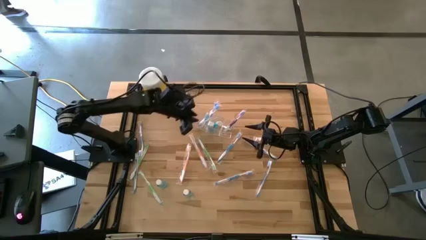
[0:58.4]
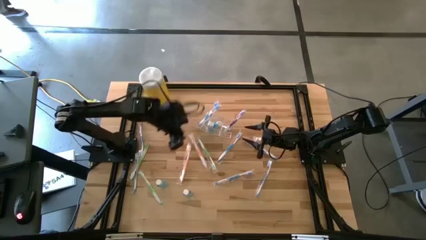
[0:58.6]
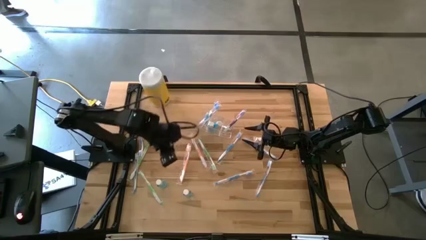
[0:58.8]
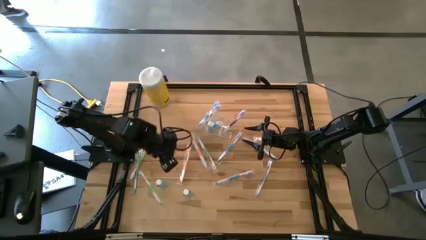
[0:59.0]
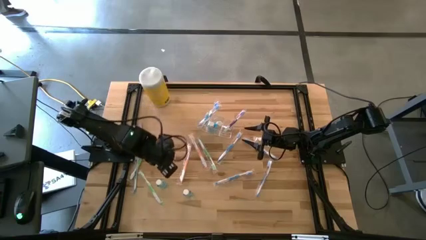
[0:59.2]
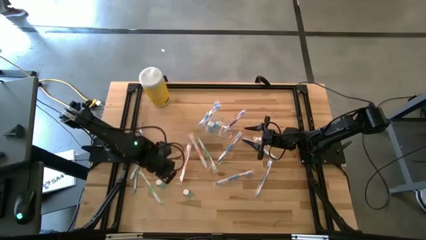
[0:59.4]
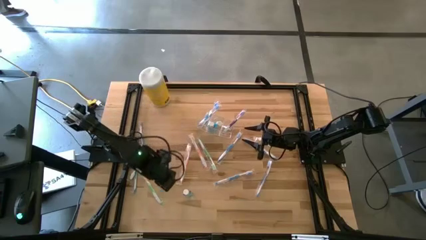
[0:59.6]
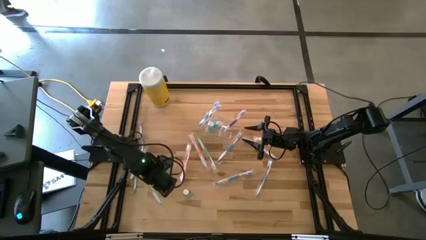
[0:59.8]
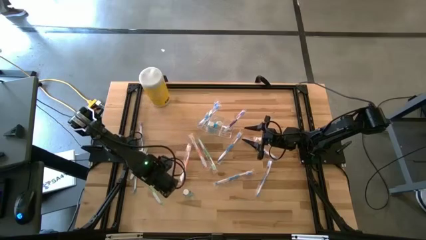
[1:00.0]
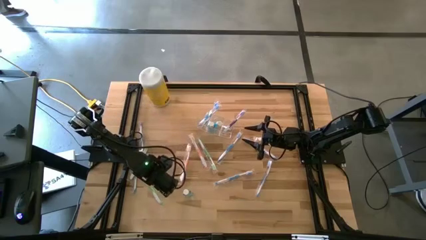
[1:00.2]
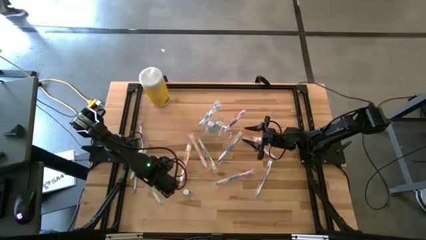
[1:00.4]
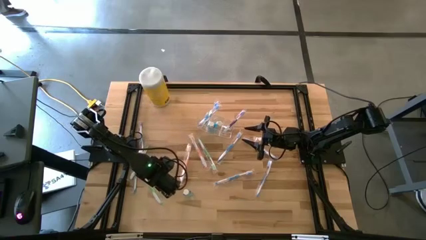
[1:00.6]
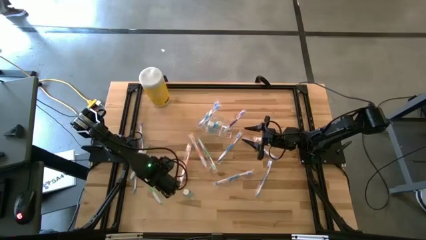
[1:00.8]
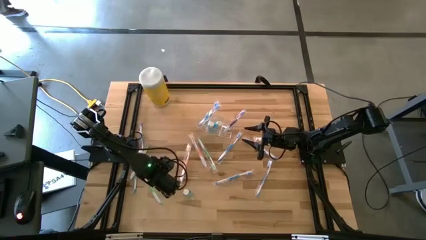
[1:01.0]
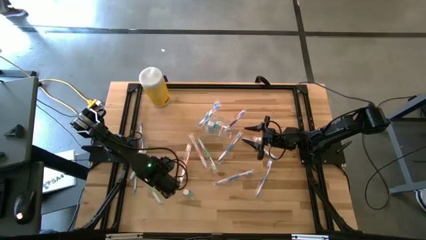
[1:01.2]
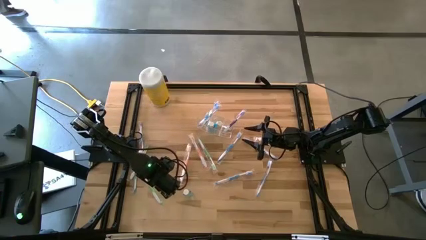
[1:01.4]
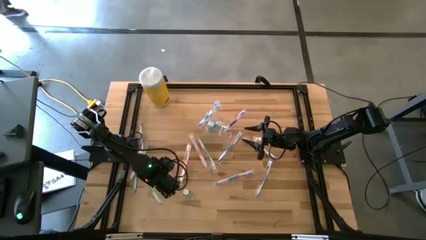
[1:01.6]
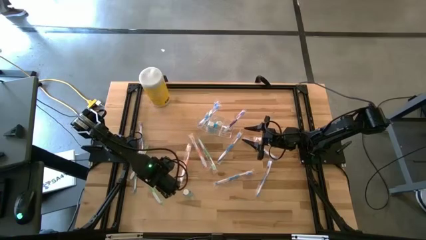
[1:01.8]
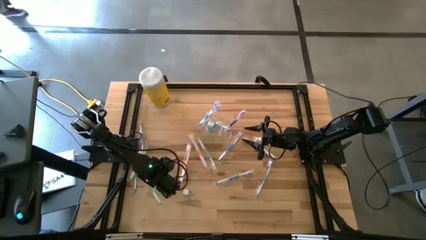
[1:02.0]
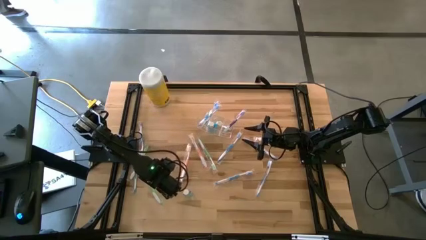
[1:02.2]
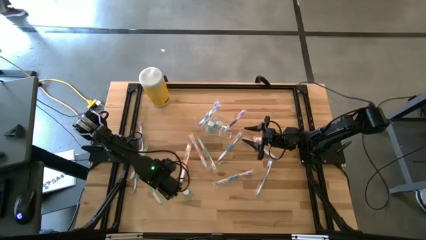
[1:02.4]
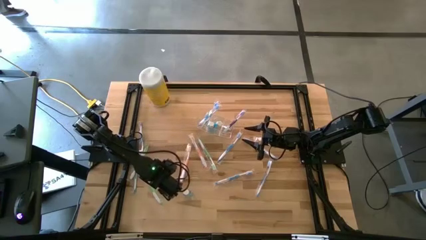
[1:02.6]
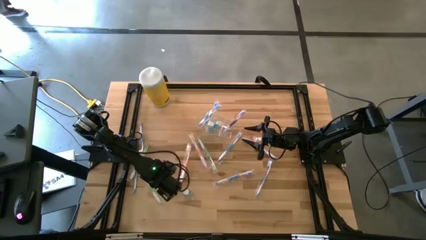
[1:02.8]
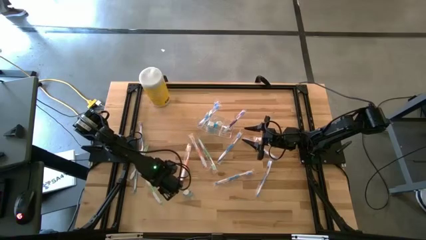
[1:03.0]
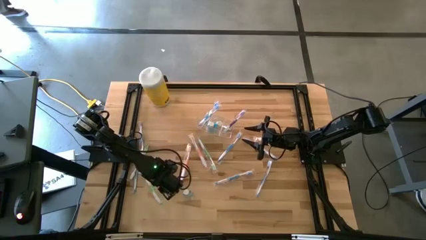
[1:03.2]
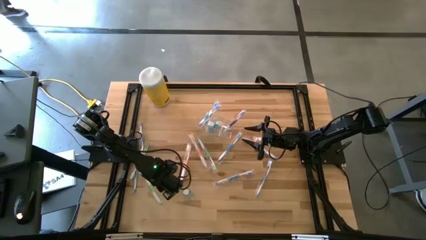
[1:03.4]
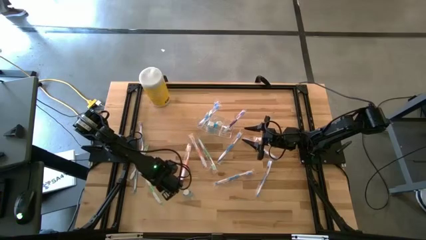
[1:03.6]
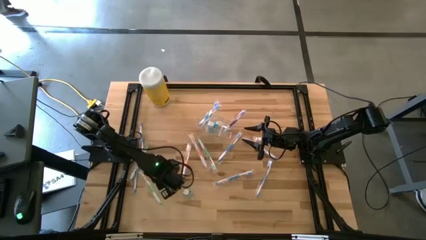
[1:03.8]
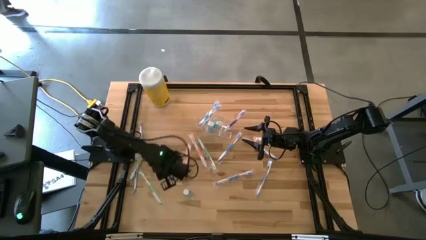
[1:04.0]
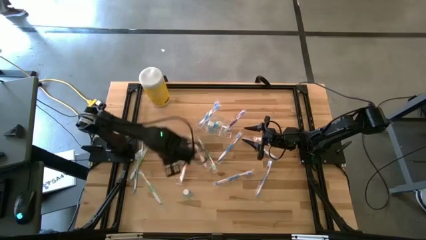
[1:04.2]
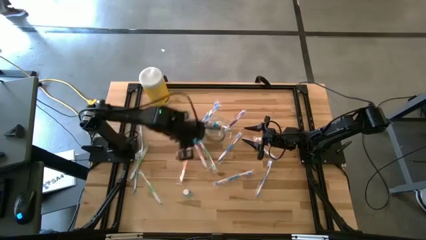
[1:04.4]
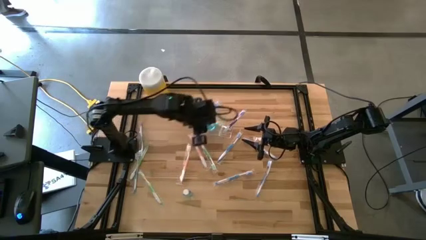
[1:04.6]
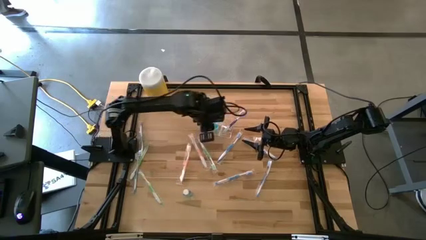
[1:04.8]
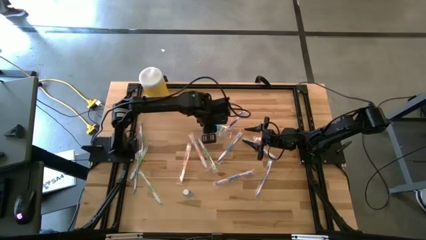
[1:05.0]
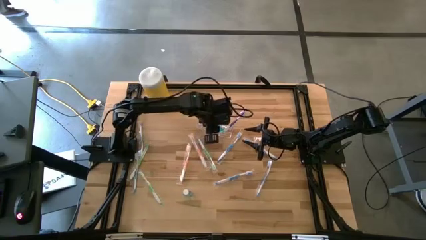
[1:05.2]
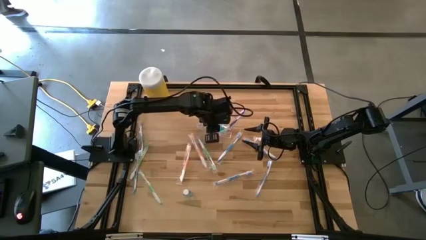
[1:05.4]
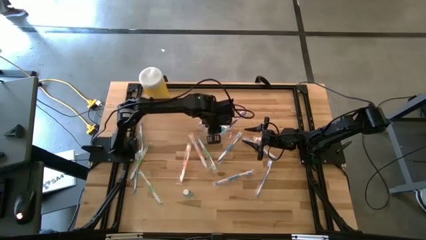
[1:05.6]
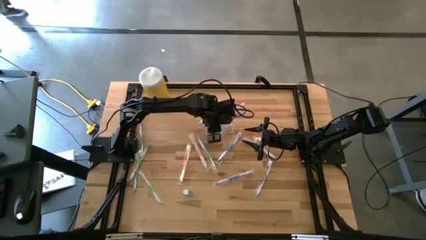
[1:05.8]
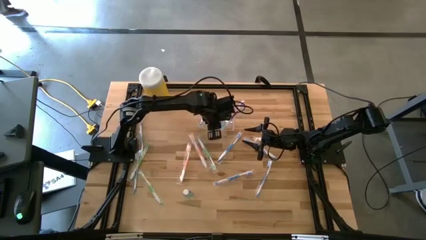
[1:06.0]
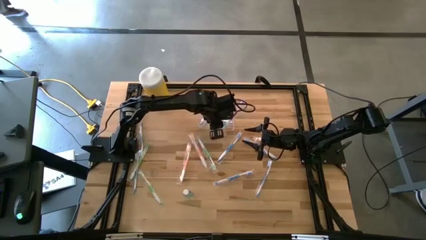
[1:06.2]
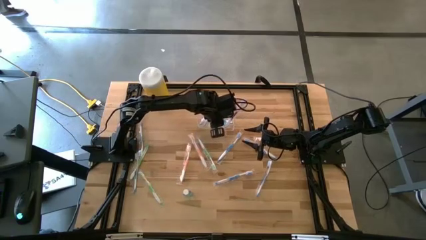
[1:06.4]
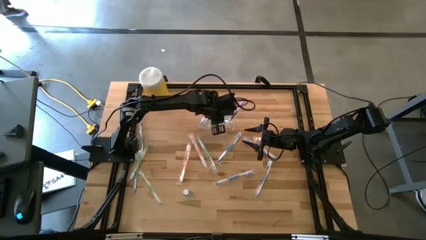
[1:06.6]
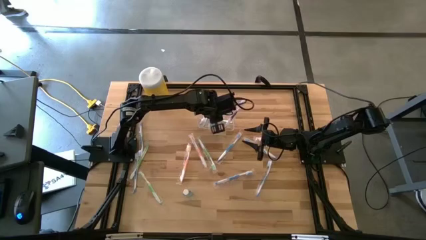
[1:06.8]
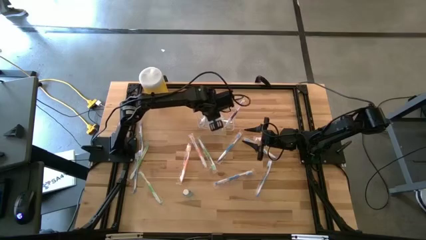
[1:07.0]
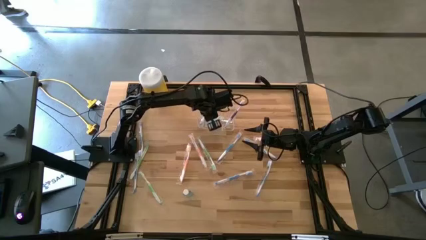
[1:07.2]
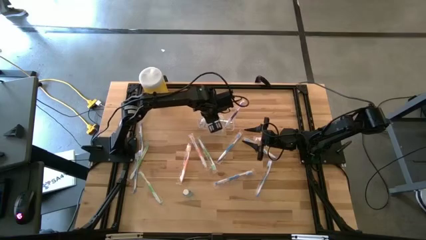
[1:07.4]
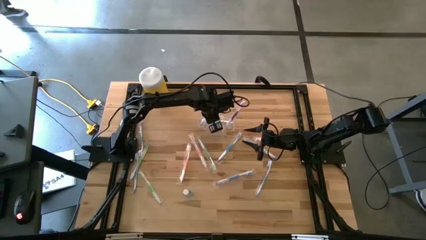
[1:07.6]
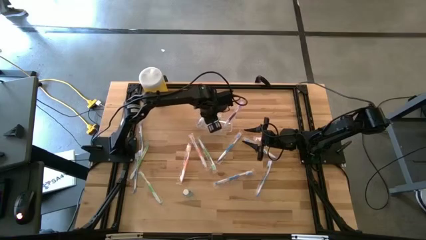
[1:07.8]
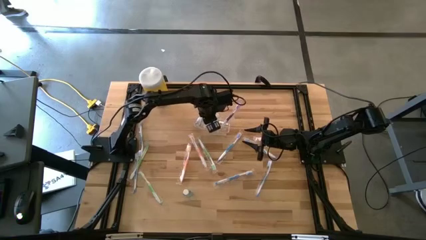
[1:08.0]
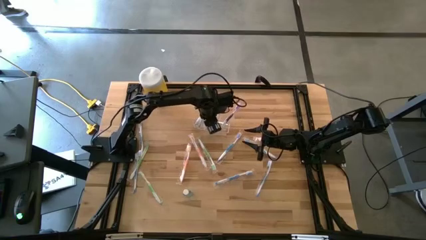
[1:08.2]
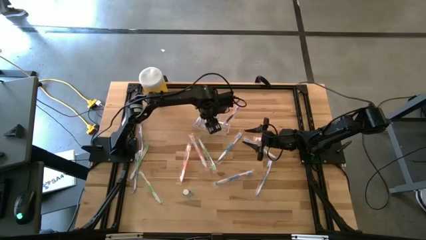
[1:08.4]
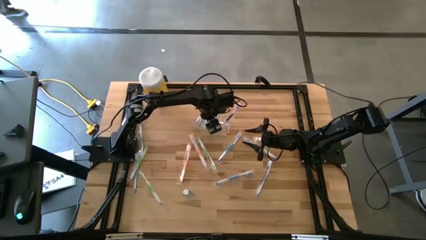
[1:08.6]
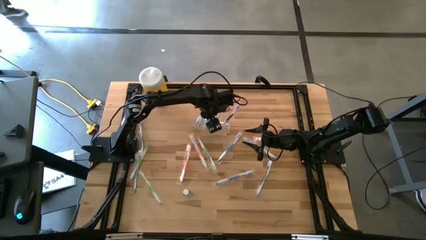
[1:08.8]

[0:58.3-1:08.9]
Task: Pick & Place toothbrushing station
Put the blue mouthwash into the transparent organizer

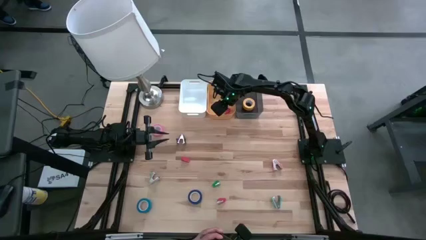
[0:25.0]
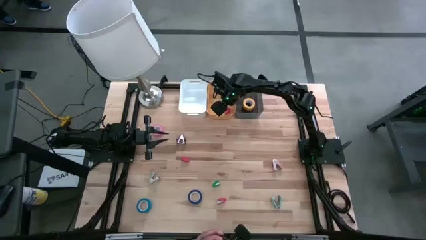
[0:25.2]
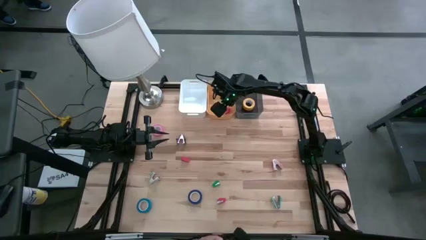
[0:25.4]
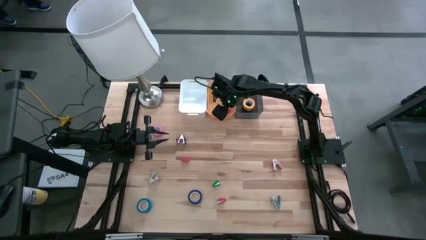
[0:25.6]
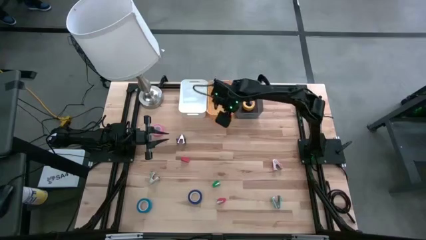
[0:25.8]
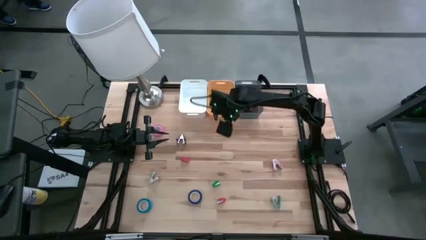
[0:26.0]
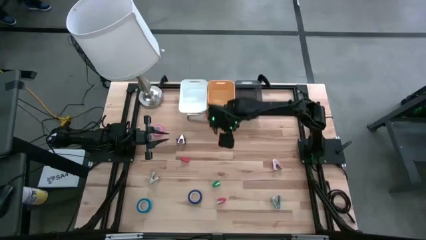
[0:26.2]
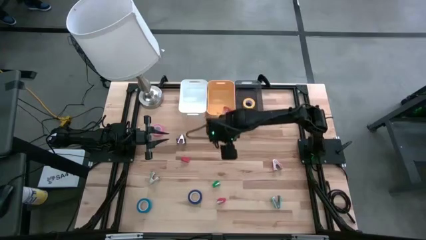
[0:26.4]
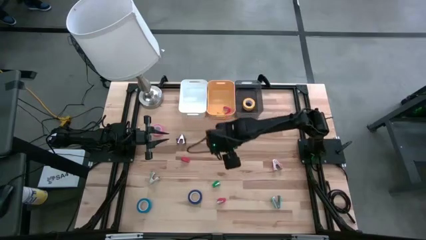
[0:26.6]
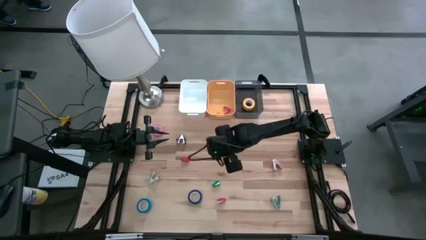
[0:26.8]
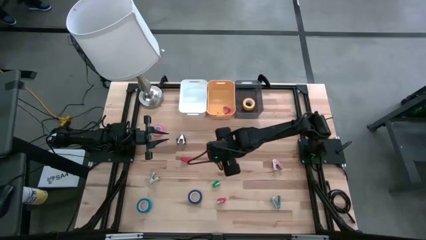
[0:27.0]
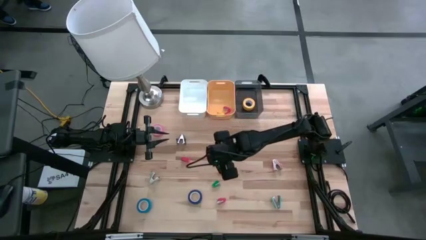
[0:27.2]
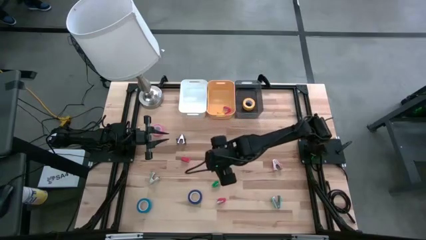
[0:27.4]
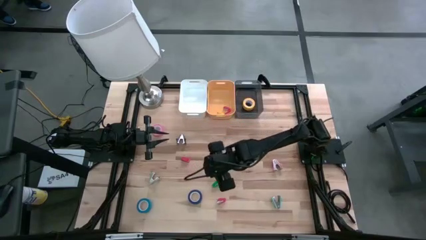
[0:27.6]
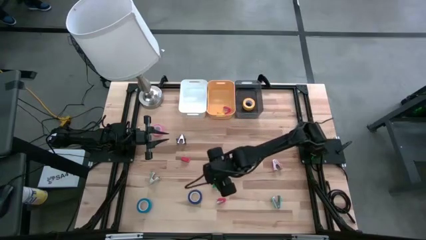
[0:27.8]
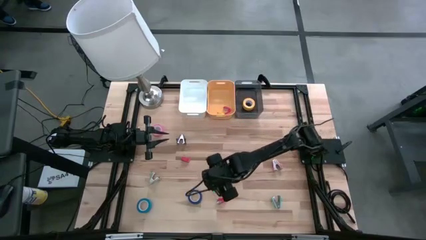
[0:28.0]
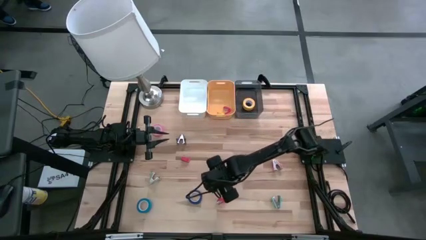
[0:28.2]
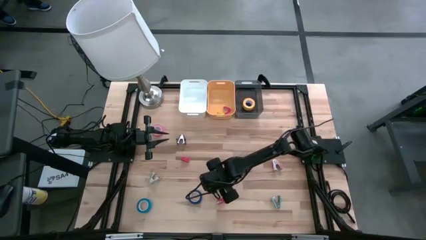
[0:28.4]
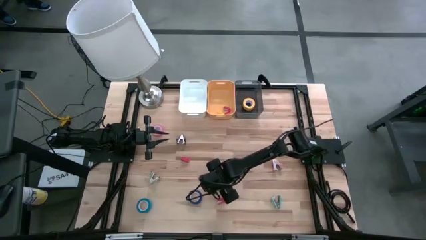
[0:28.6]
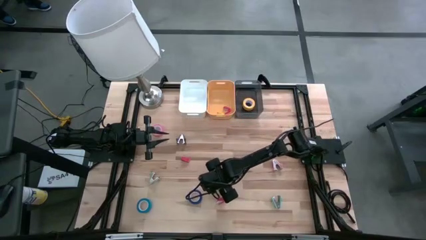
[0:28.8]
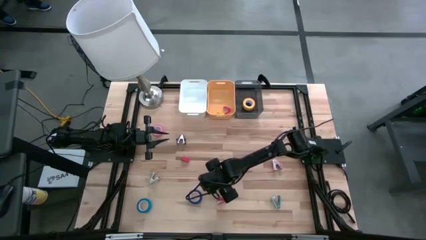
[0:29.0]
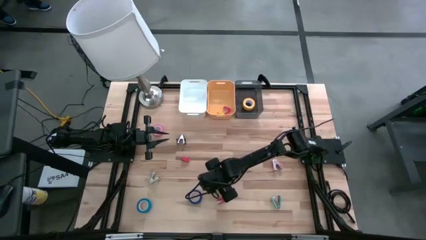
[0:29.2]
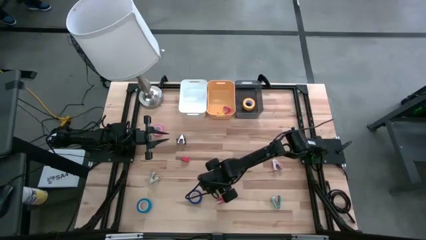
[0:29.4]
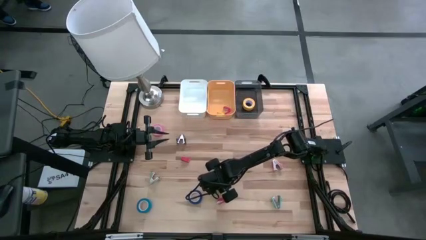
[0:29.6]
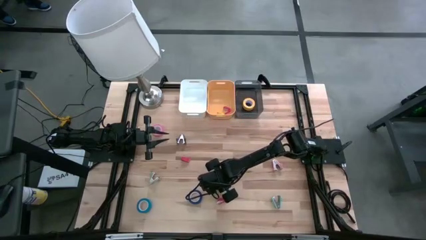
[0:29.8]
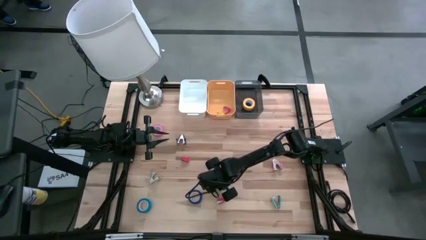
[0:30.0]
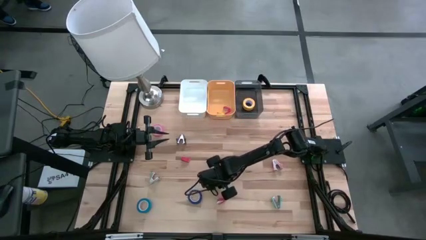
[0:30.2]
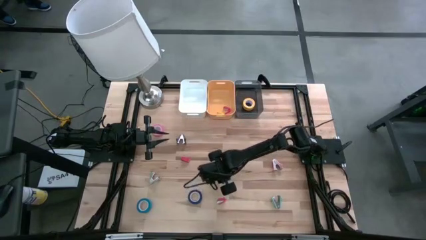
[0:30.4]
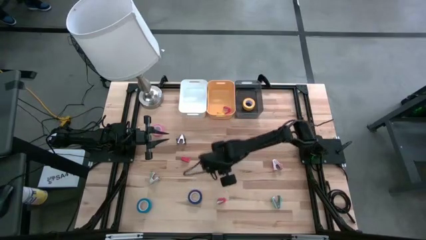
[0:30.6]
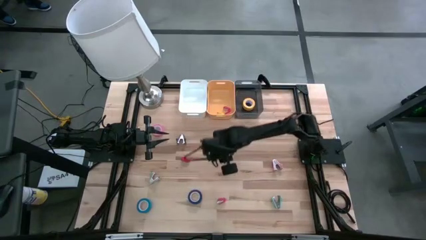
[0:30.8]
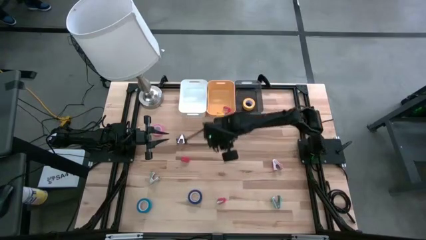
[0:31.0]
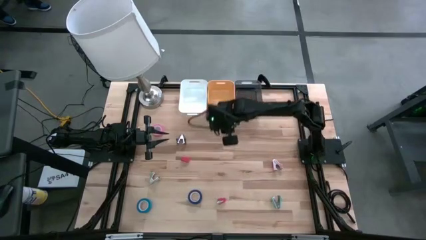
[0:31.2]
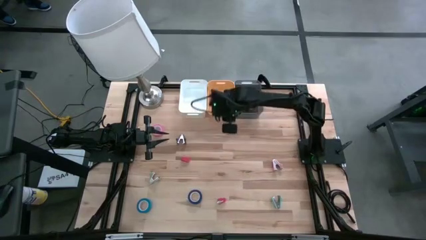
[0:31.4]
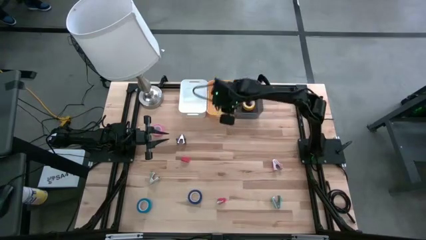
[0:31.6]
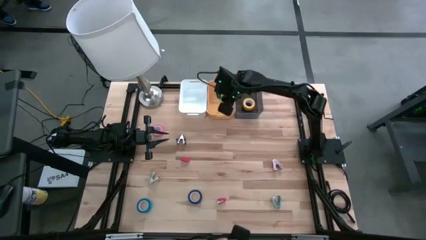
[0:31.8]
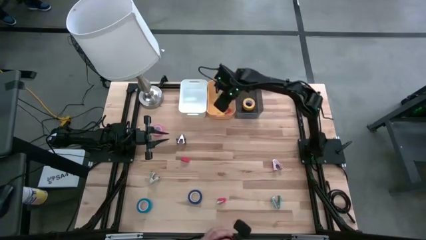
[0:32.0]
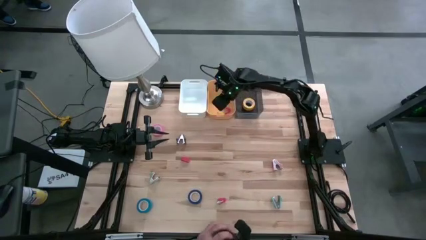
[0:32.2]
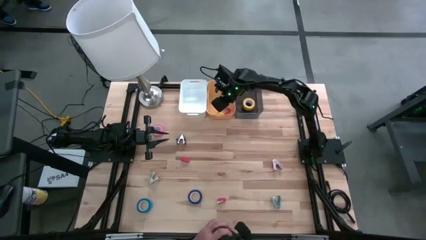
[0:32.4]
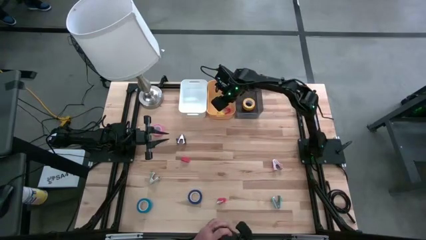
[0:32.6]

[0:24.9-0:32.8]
Task: Pick and place Stapler, Stapler remover, tape
Put the green stapler into the yellow bin
